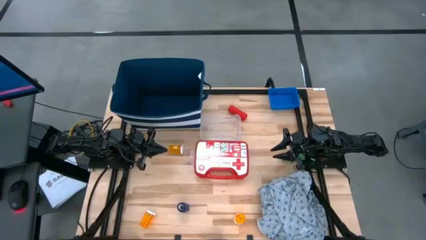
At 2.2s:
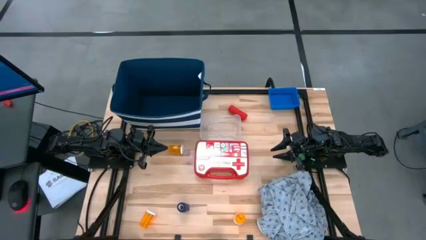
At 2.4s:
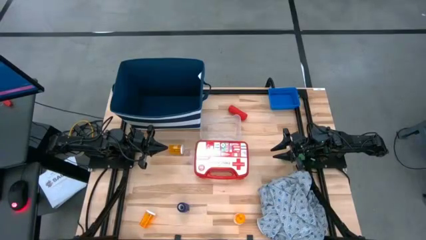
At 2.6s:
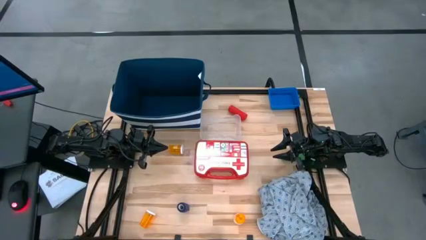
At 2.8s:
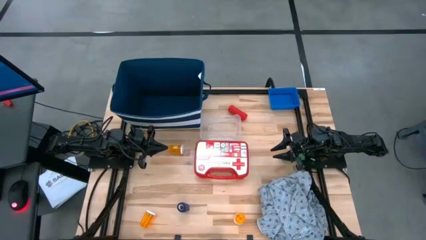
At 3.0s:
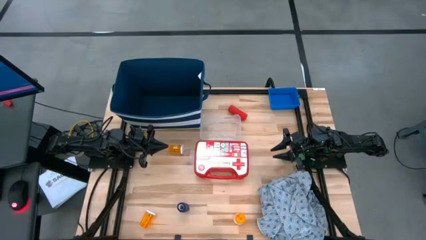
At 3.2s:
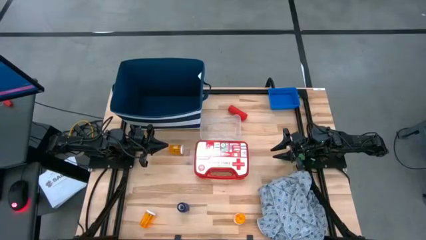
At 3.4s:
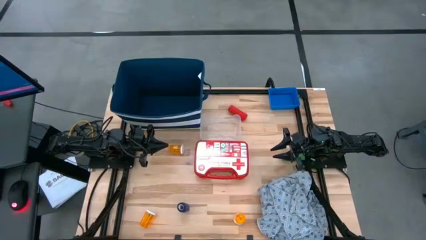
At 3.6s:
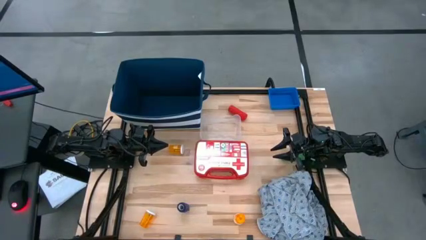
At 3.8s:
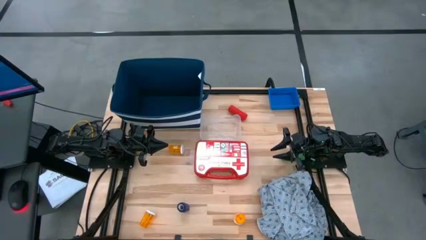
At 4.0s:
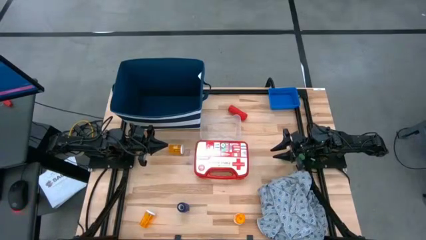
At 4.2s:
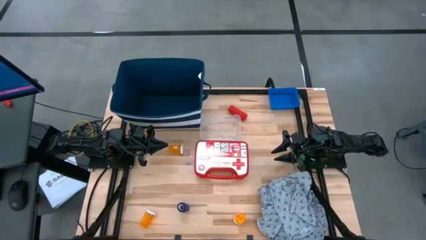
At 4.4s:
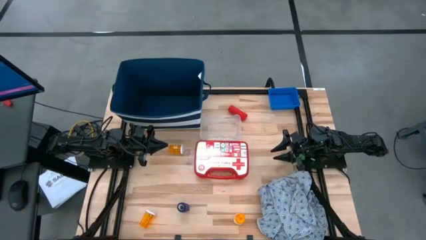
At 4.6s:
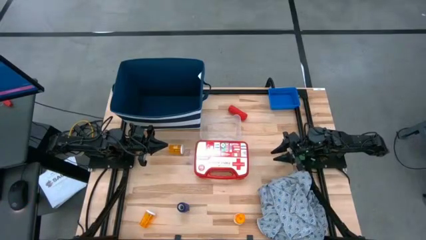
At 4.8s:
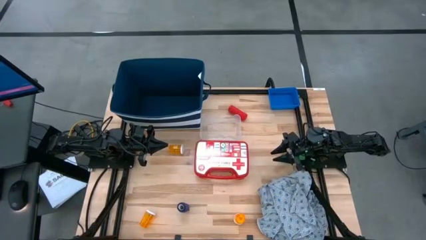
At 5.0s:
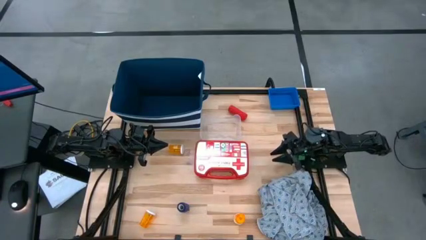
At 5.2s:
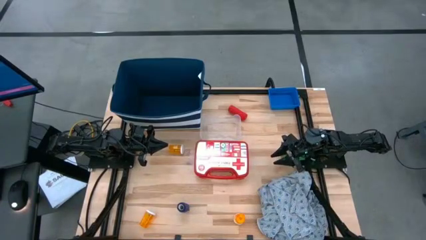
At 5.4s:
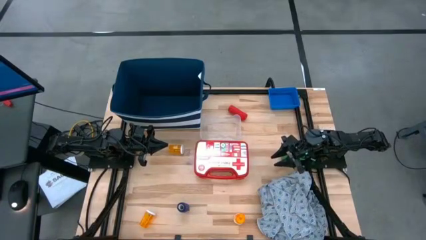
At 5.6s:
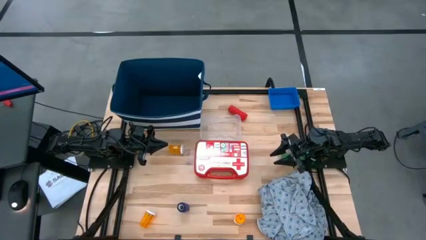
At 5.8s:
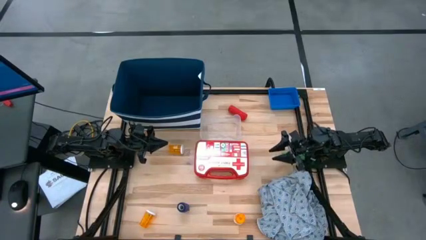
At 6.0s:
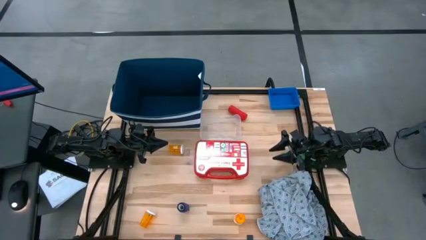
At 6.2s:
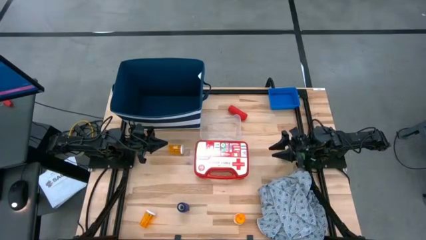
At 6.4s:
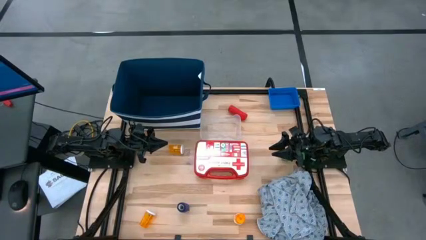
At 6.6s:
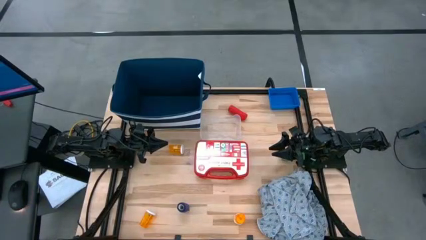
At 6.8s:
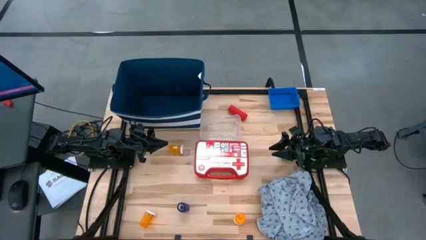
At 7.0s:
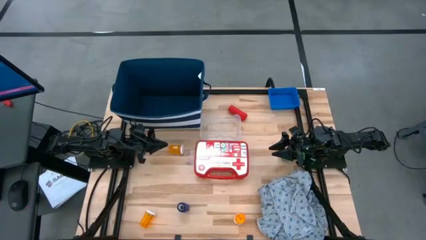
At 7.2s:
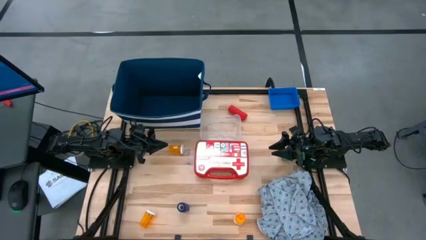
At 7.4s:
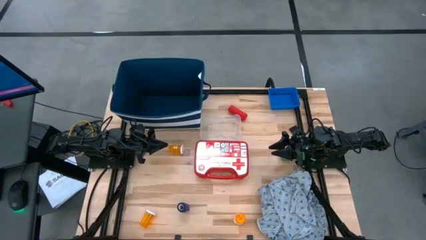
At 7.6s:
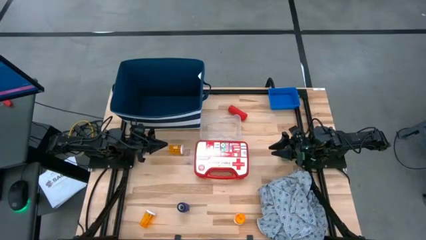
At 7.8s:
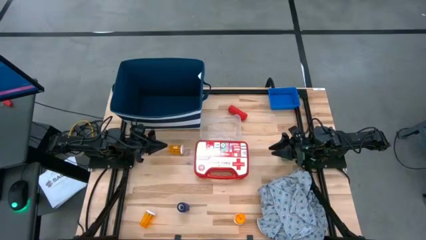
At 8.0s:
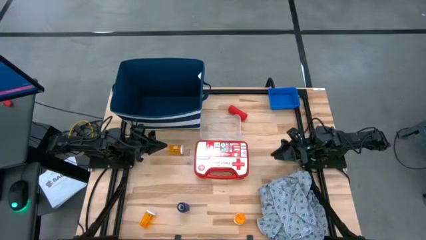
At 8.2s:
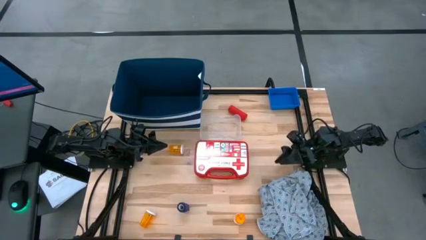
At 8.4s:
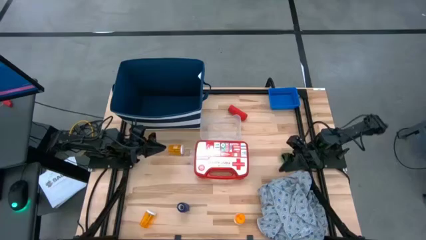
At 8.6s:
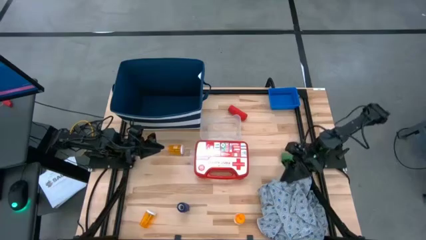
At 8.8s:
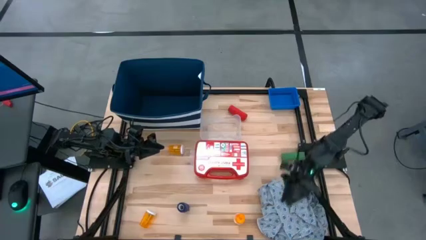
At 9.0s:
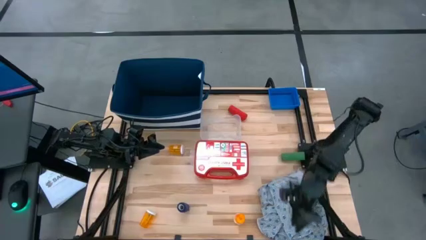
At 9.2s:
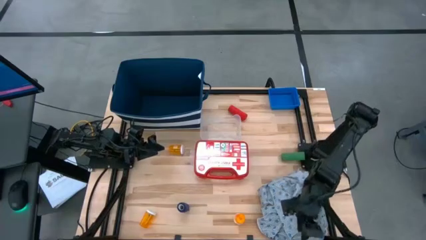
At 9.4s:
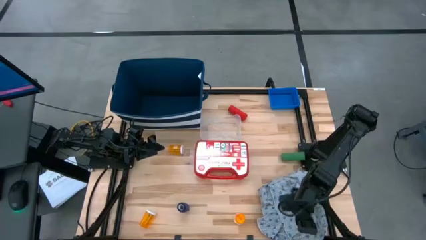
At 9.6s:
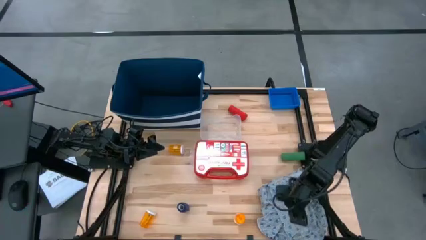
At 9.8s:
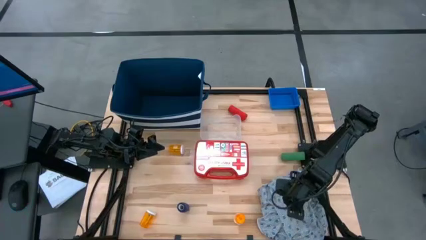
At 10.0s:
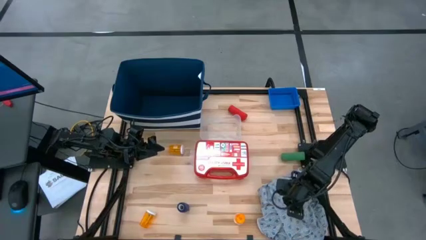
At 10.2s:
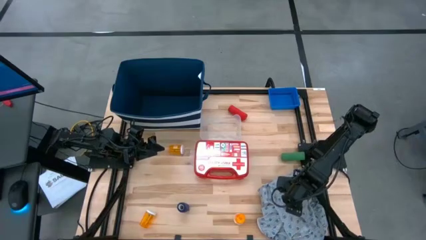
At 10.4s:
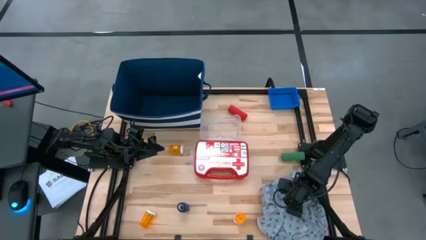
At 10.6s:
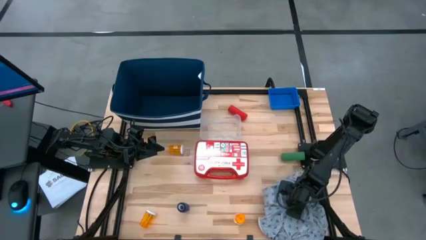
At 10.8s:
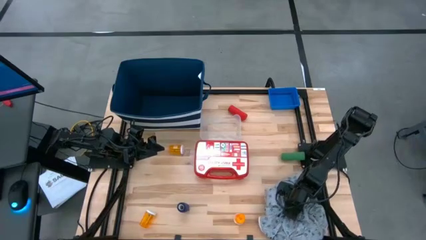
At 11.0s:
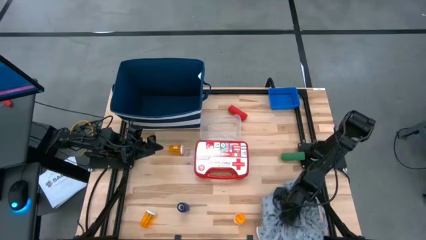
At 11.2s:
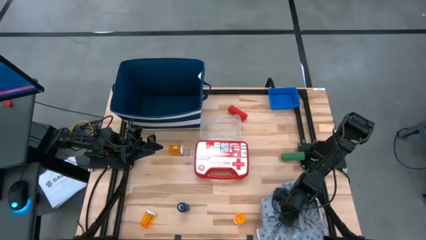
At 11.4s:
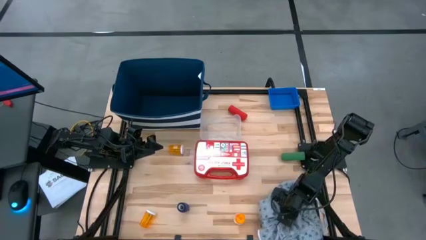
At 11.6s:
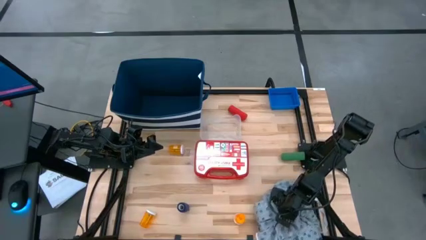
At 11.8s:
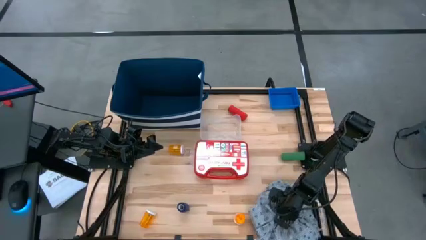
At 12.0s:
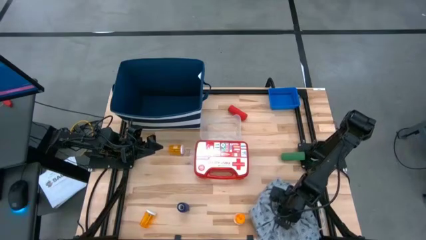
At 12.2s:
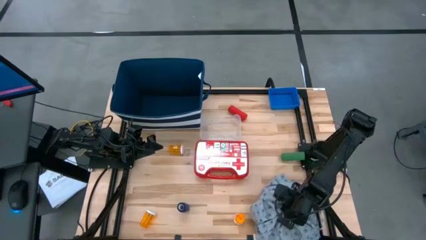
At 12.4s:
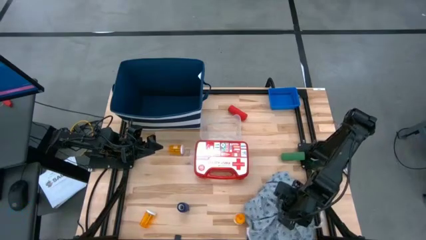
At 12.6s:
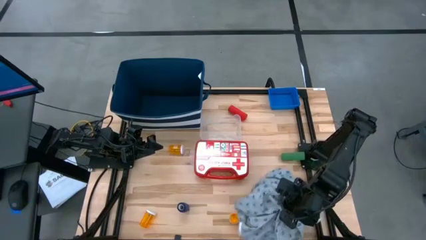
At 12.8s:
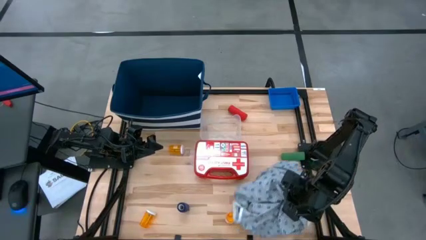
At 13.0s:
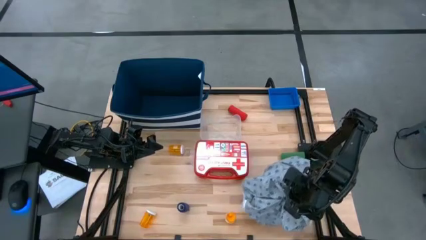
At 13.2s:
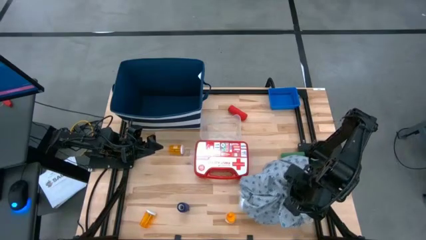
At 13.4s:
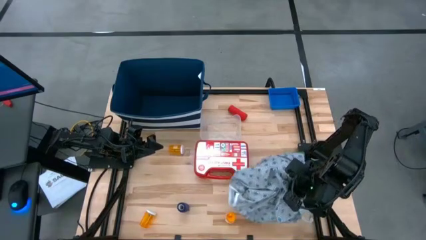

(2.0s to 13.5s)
Task: Pick & place medical supplies in basket/bin
Put the gray patient gown into the blue laundry organizer

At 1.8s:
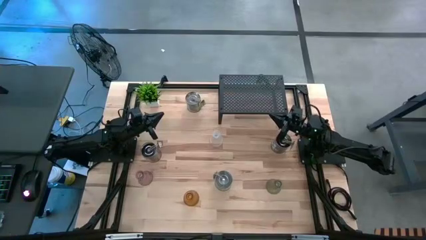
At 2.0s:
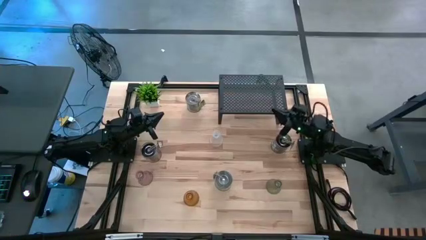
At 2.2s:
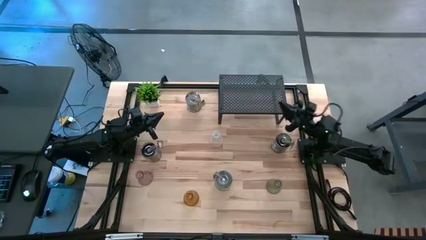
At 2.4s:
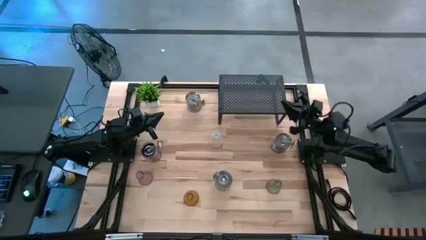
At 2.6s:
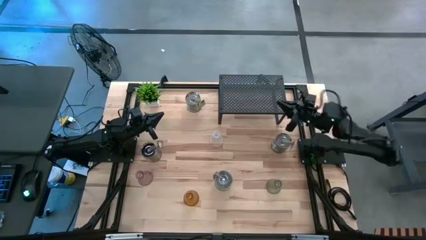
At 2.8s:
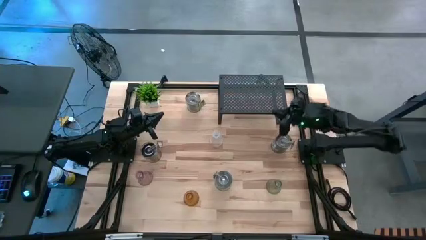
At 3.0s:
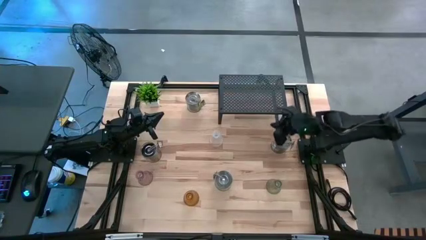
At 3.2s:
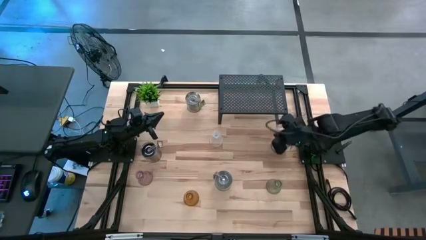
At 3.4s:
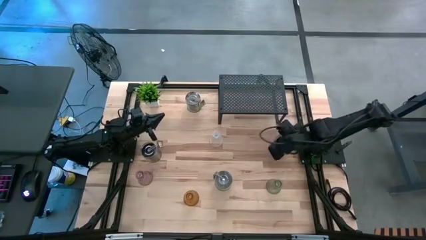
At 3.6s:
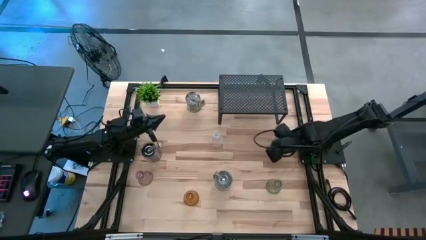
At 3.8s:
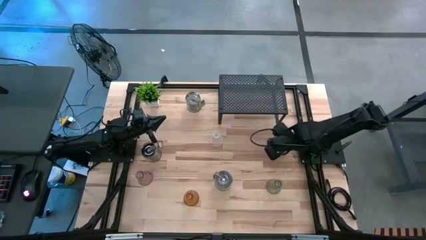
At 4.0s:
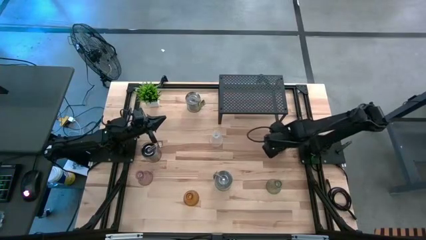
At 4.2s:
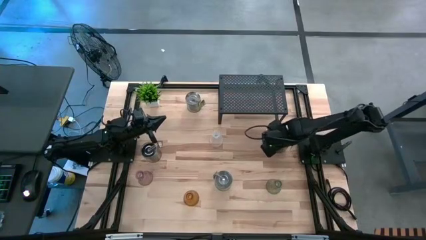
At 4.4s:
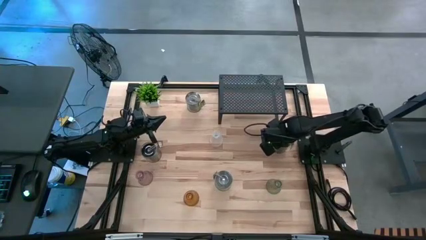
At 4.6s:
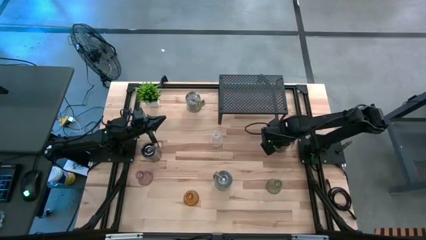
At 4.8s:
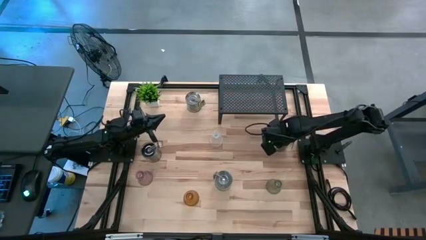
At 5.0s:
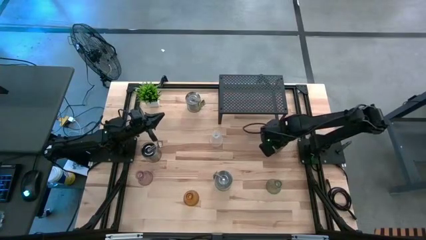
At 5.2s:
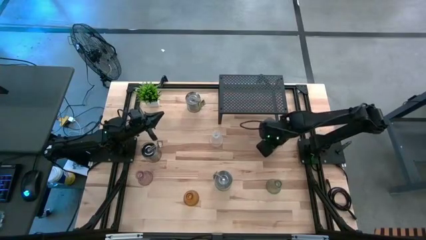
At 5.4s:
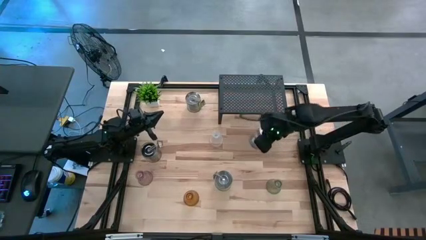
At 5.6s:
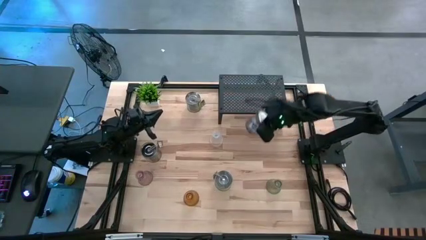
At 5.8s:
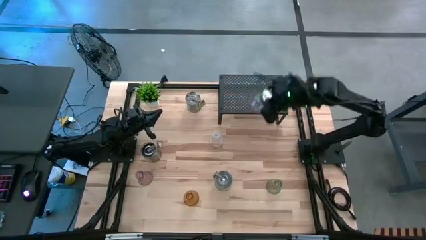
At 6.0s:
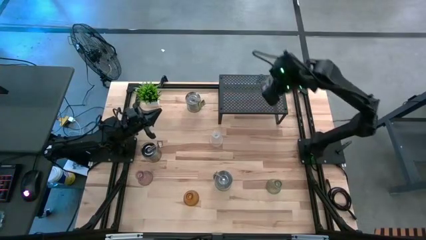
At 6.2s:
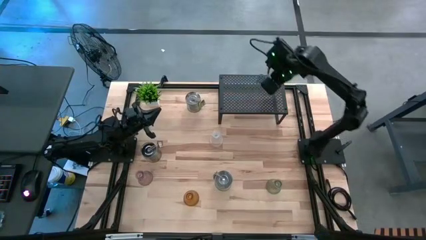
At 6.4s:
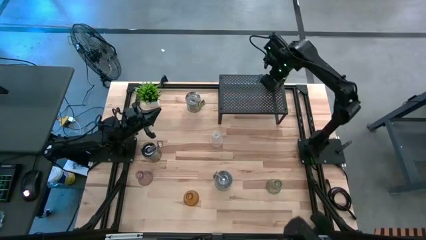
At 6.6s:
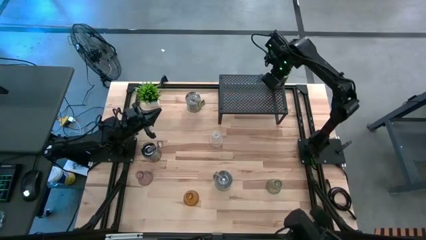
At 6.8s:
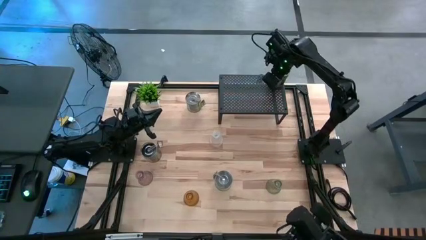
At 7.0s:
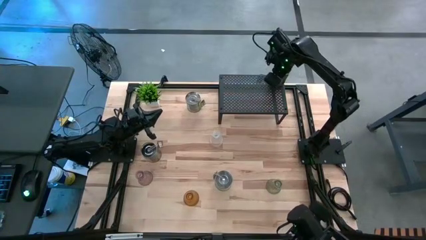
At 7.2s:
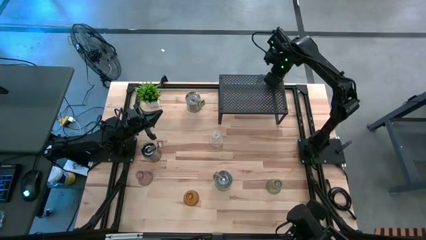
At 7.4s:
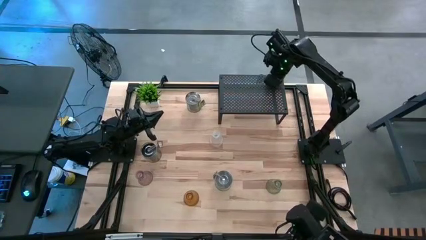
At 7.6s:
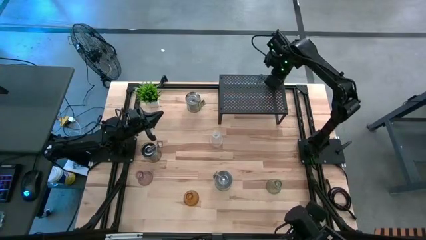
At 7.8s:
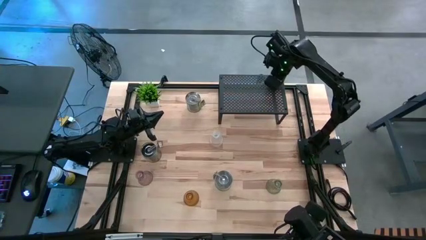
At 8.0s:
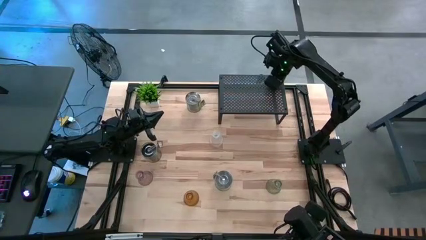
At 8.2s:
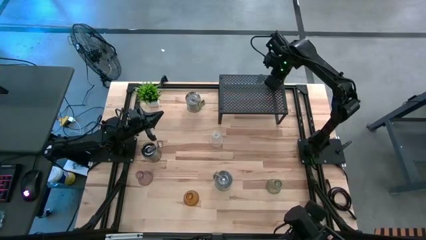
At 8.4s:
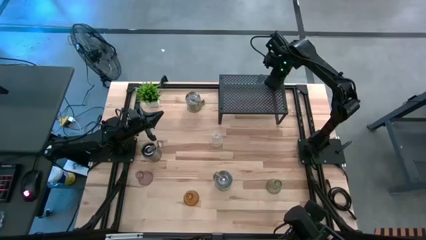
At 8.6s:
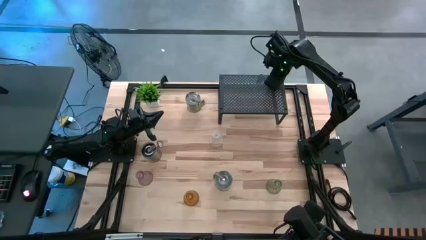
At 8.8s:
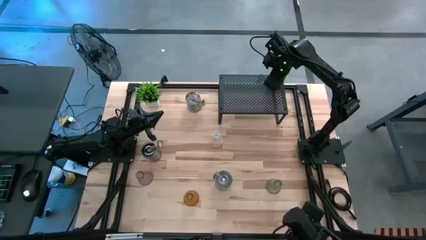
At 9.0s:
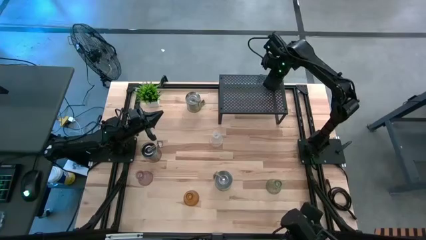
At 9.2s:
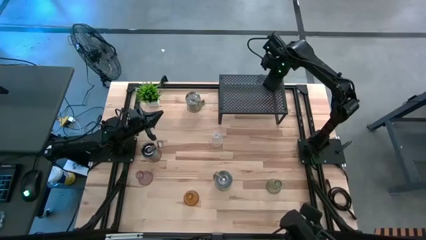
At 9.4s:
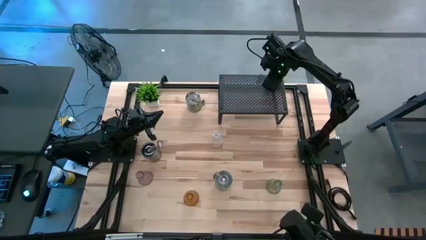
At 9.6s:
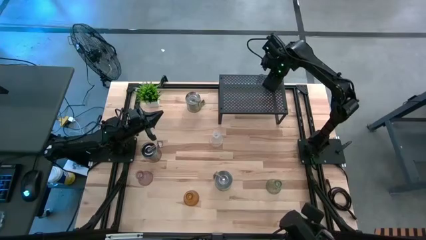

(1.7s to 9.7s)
Task: Pick & Place candle stick holders
Put the silver scented candle on the shelf
